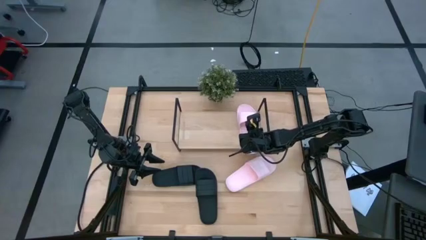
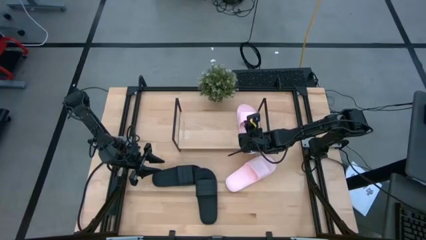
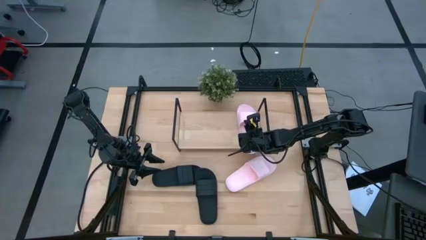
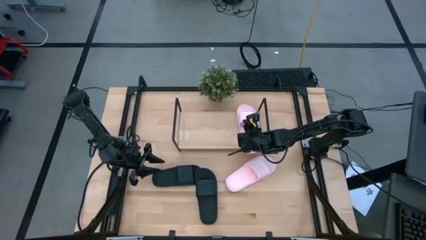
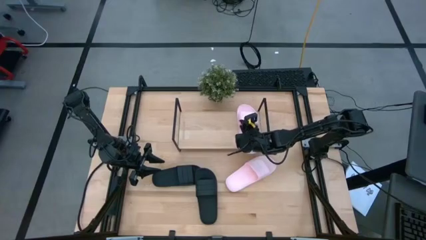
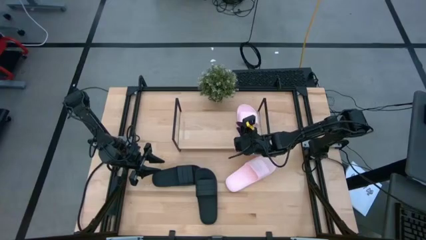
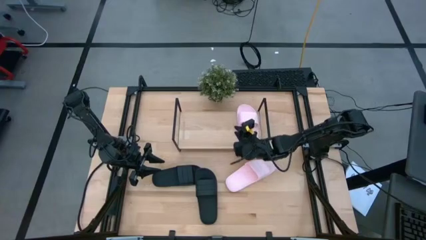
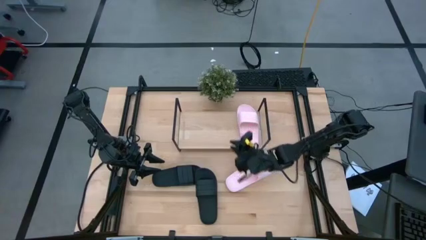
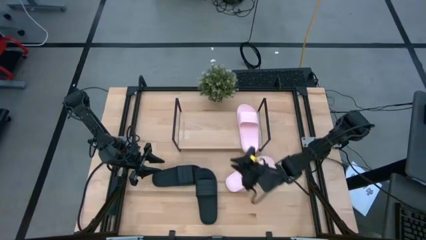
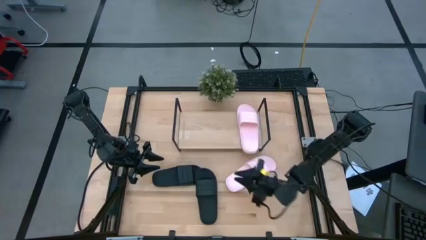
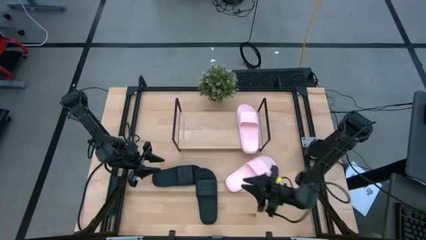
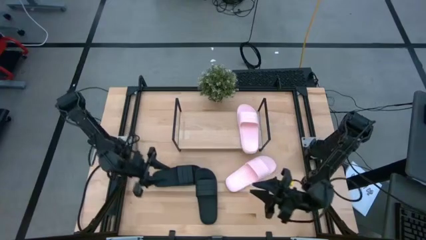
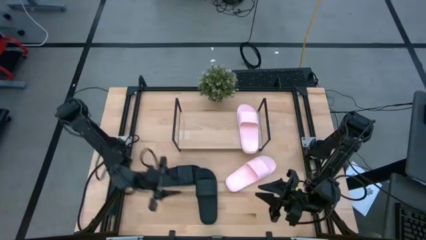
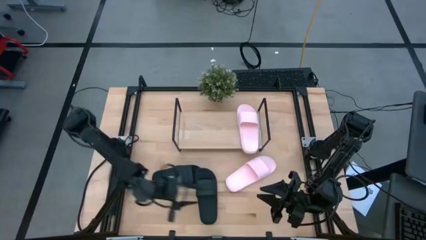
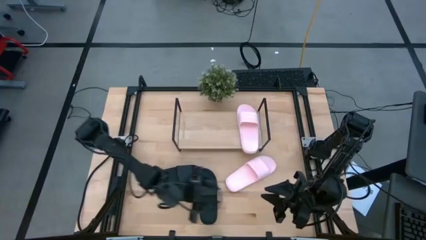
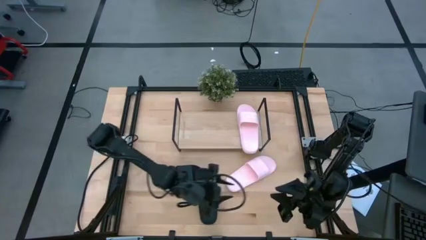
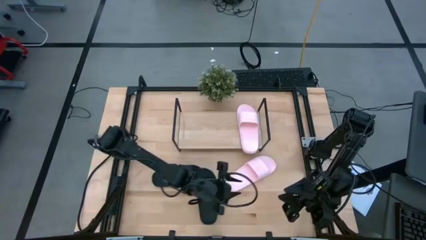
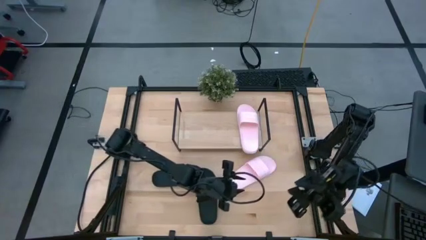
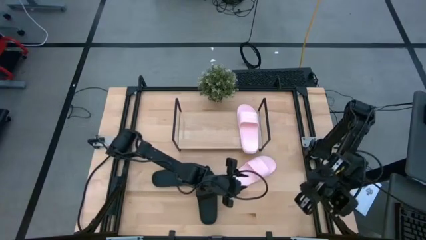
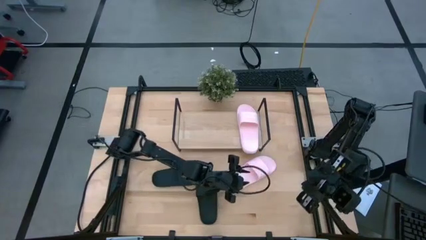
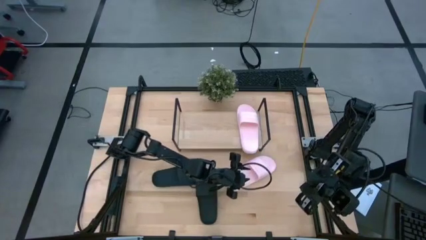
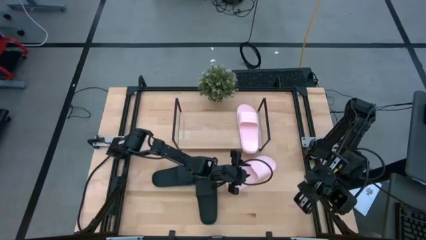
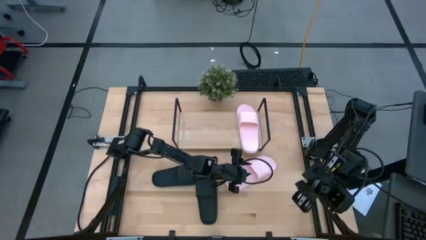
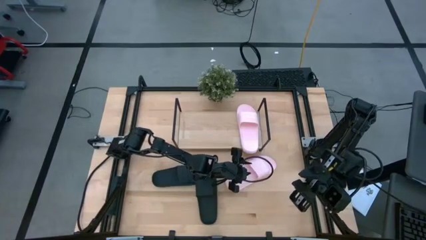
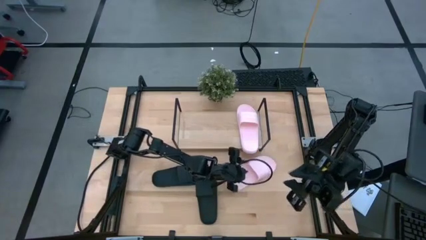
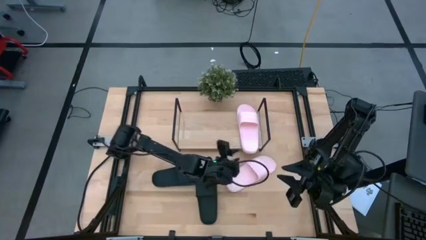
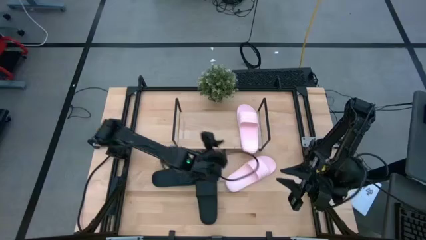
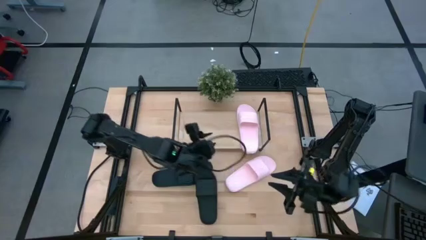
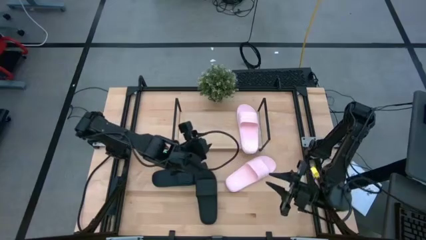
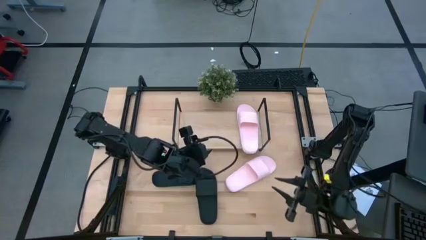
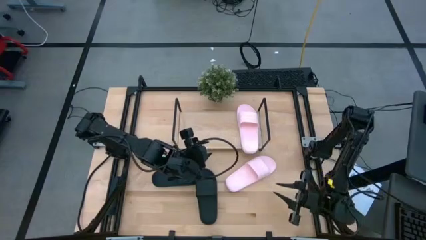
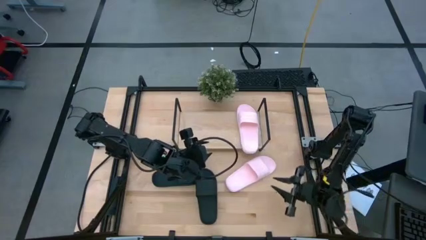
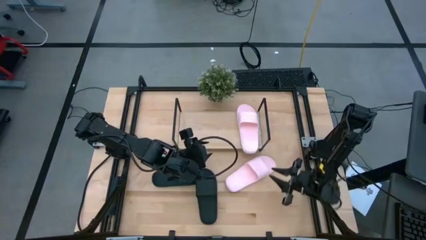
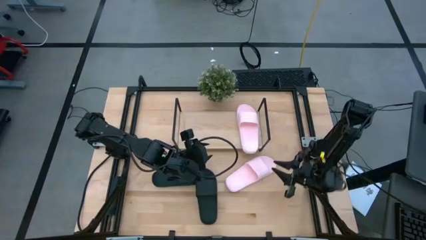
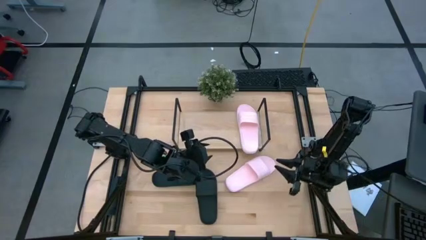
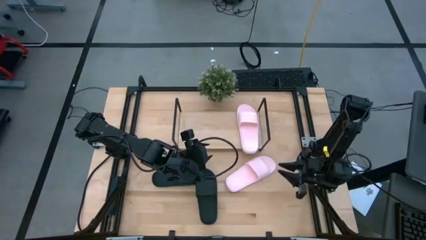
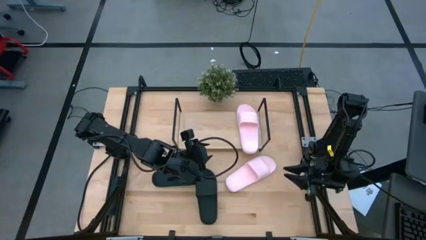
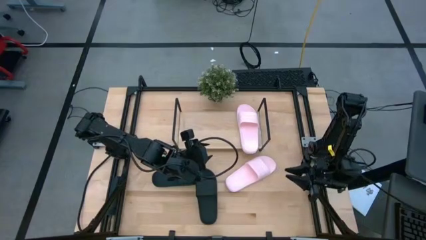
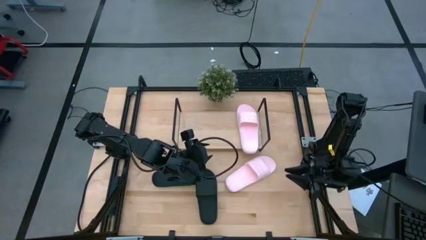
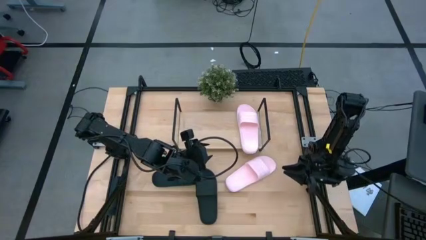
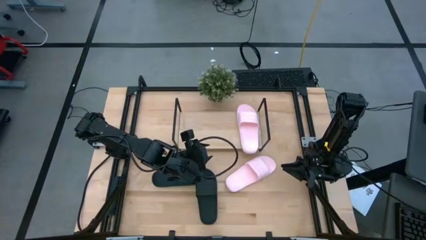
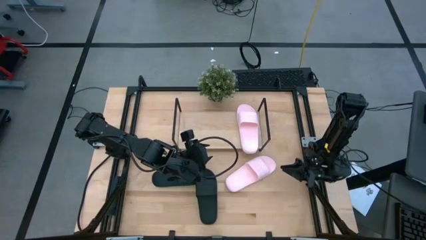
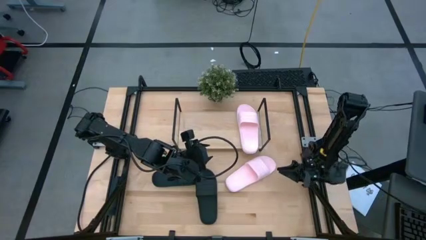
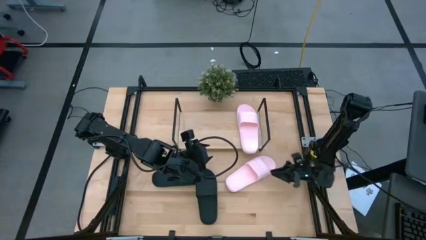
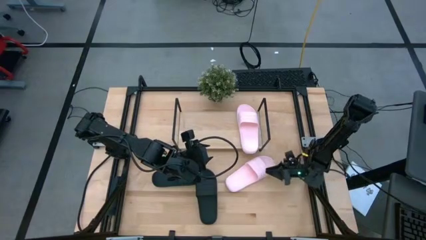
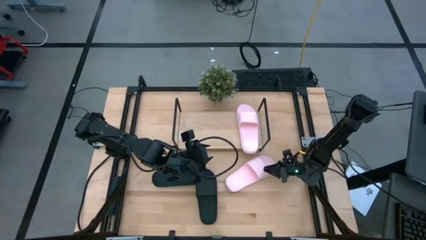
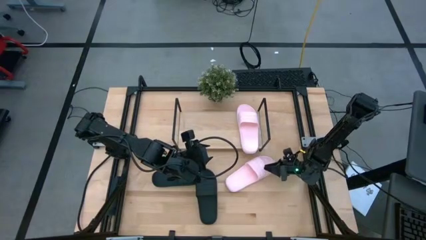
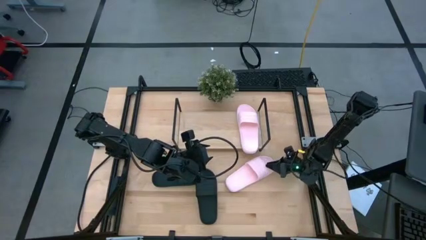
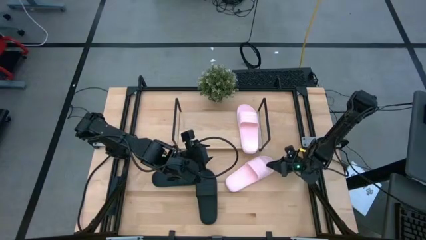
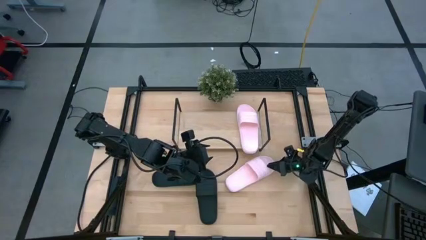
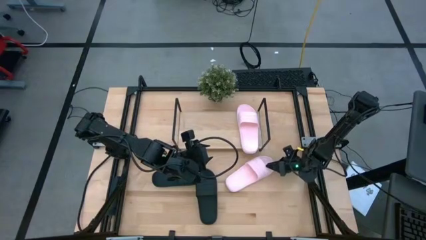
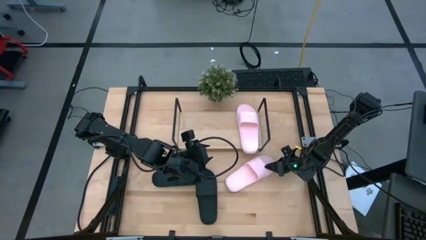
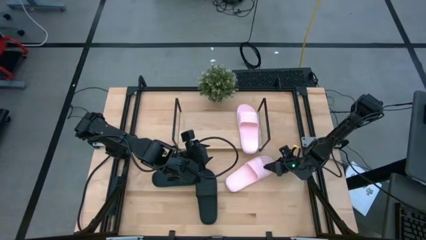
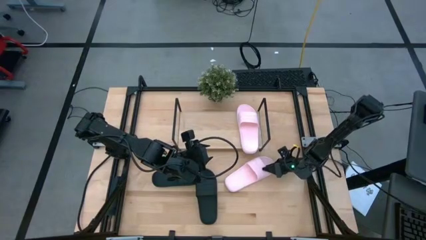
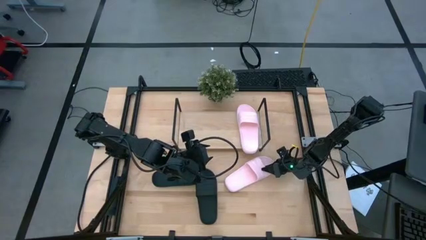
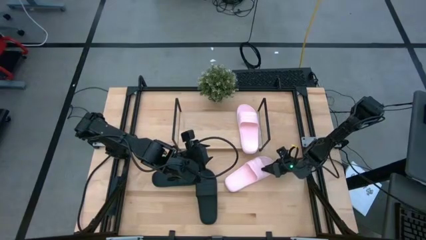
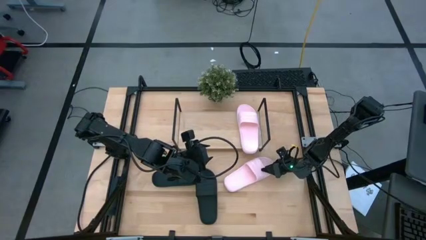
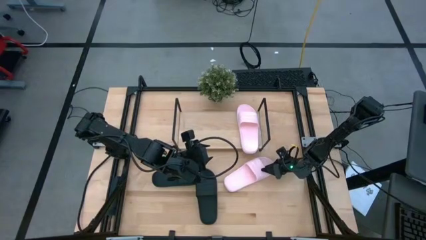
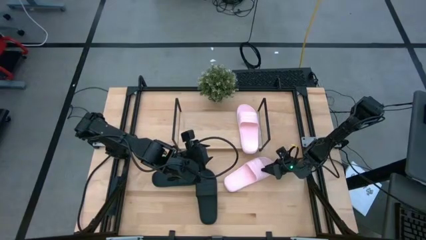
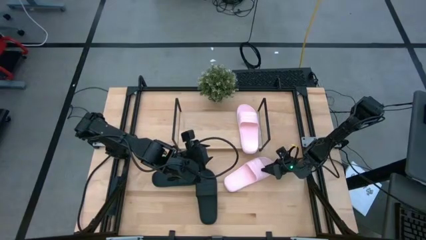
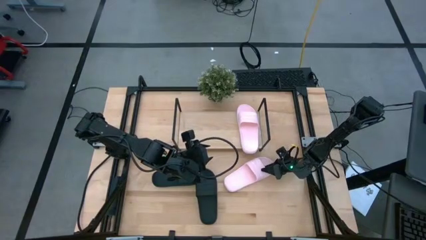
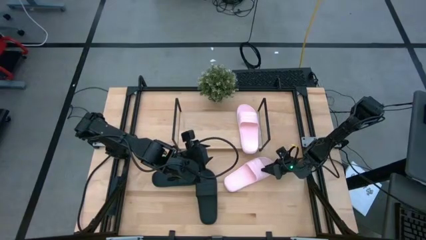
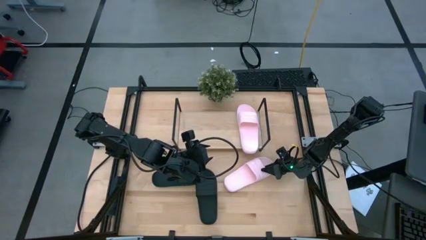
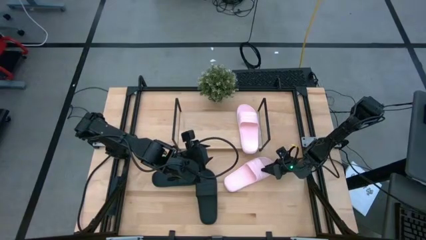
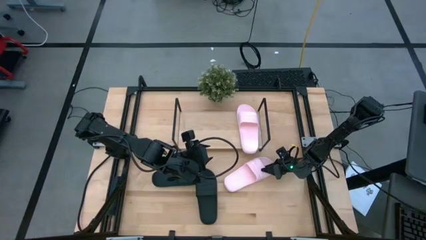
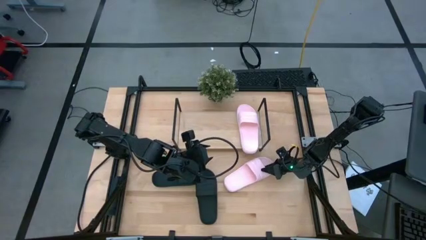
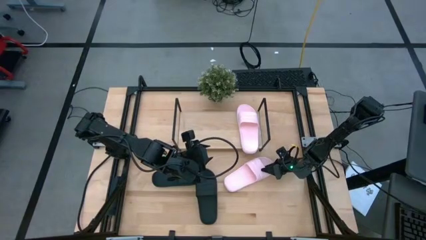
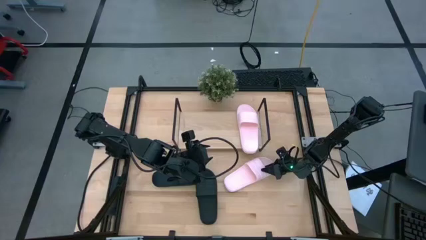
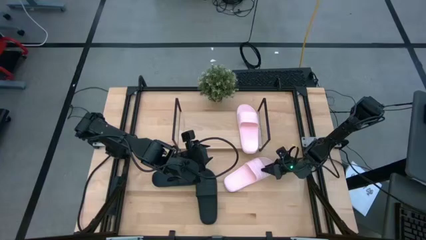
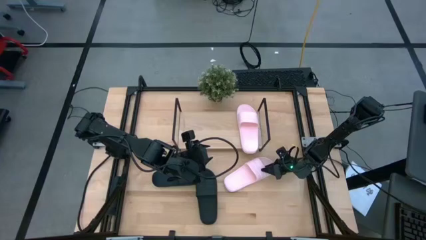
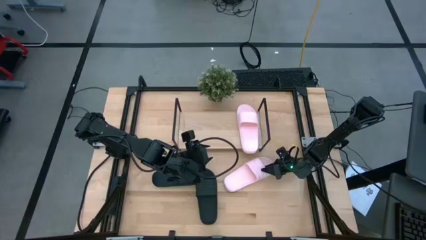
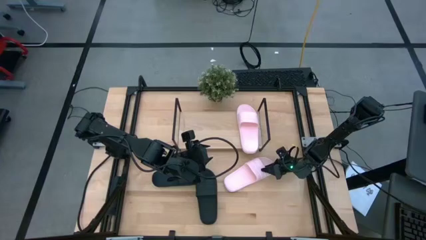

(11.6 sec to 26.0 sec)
Task: Pick and place slides into the shelf
Put the pink slides on the shelf
